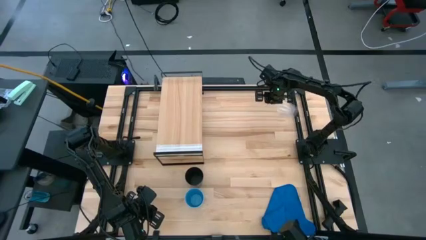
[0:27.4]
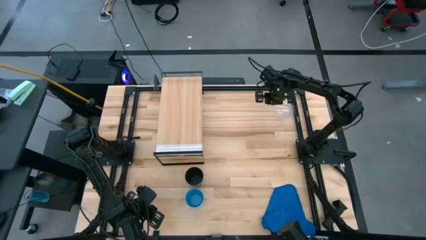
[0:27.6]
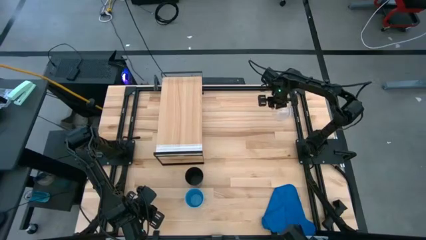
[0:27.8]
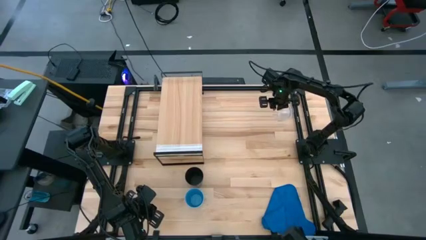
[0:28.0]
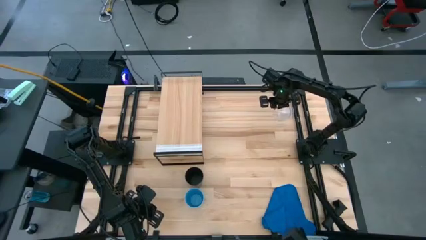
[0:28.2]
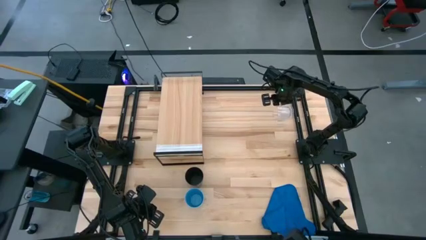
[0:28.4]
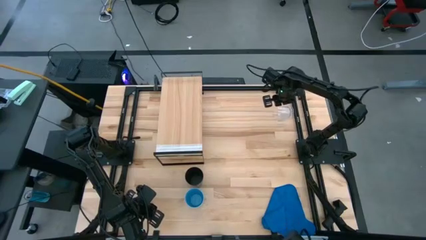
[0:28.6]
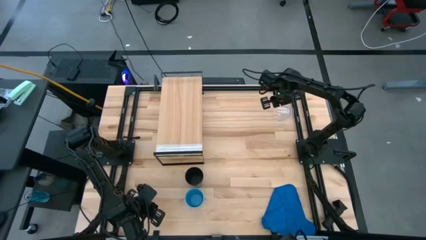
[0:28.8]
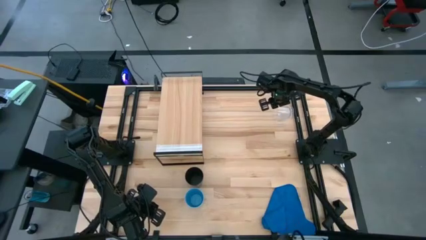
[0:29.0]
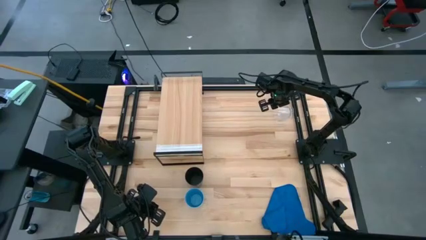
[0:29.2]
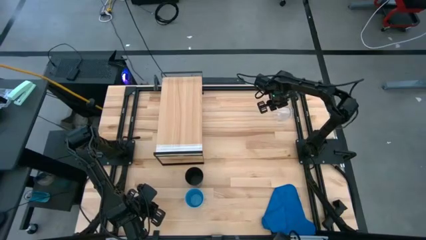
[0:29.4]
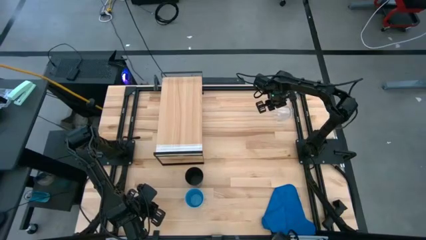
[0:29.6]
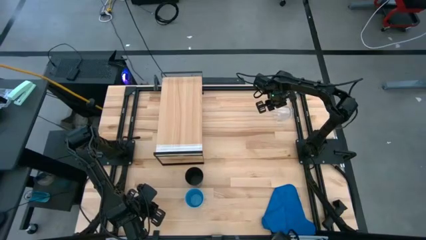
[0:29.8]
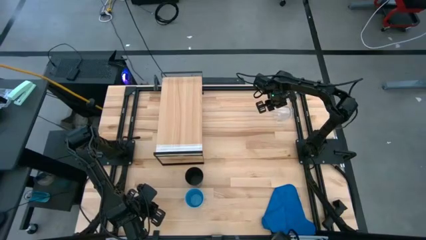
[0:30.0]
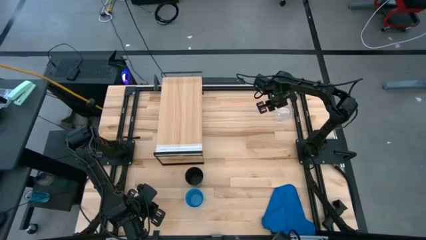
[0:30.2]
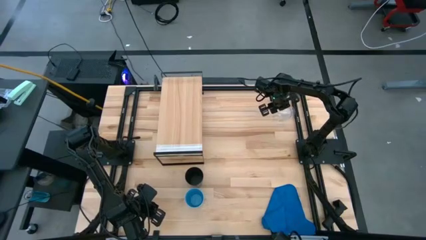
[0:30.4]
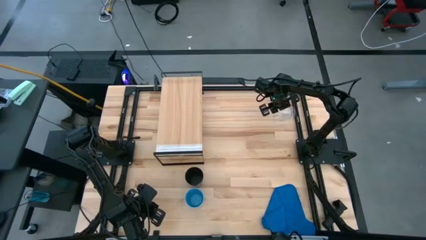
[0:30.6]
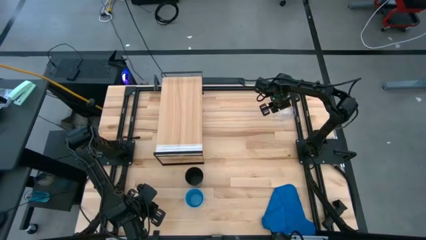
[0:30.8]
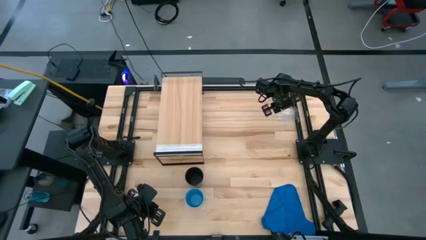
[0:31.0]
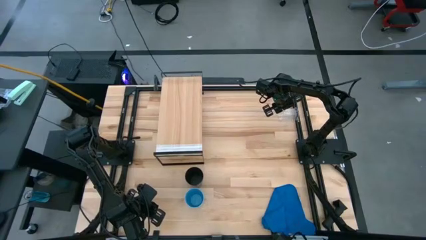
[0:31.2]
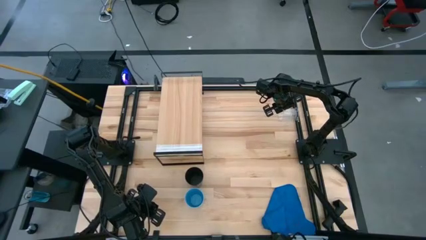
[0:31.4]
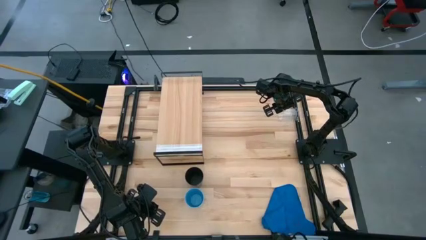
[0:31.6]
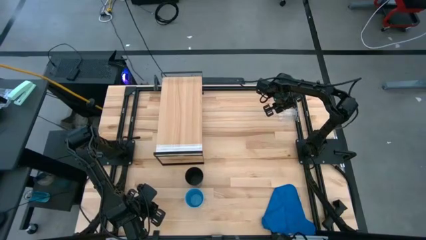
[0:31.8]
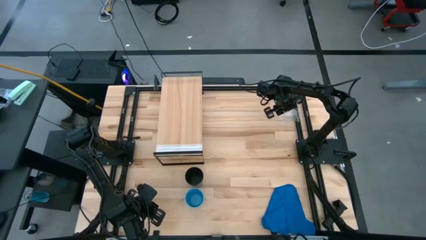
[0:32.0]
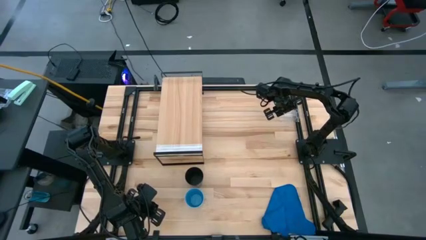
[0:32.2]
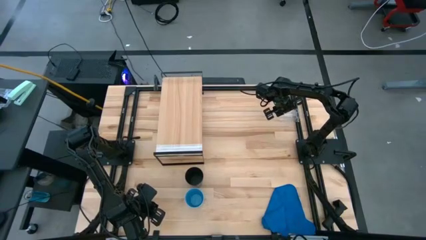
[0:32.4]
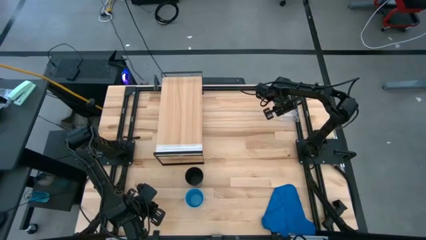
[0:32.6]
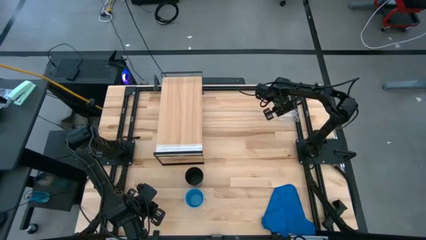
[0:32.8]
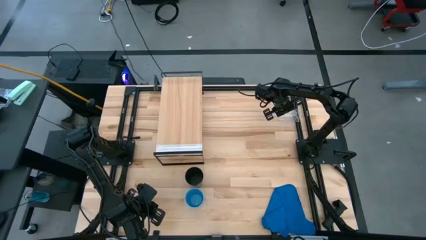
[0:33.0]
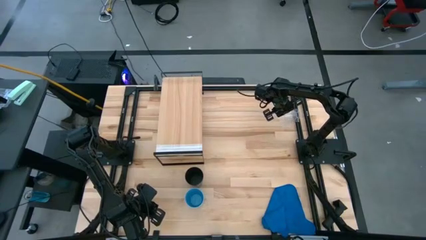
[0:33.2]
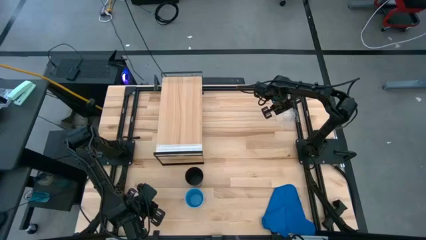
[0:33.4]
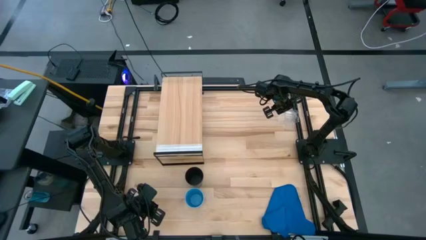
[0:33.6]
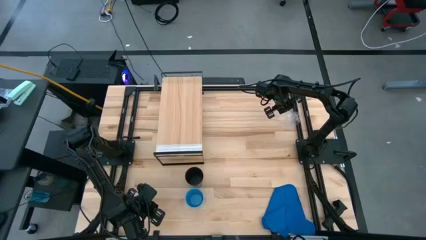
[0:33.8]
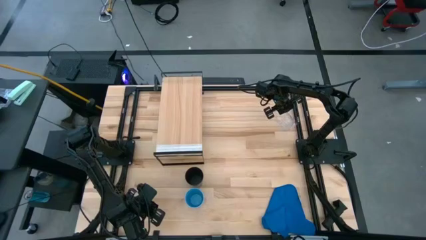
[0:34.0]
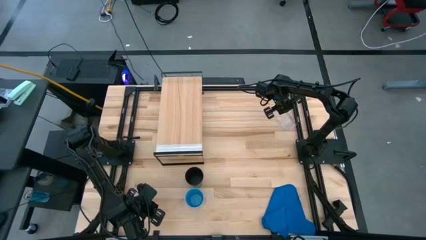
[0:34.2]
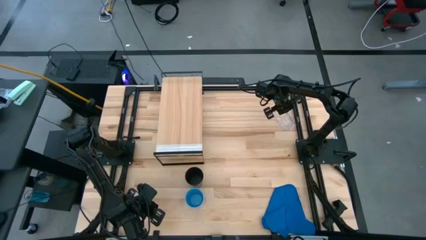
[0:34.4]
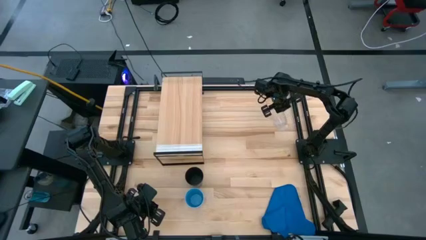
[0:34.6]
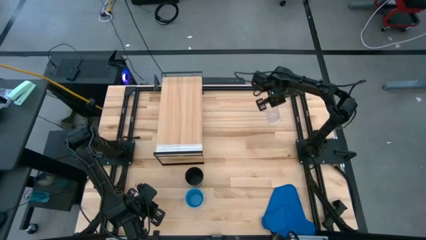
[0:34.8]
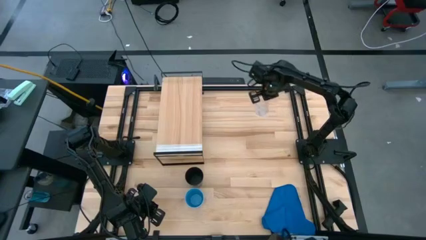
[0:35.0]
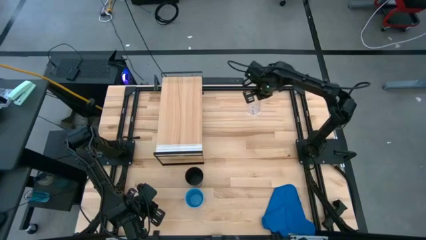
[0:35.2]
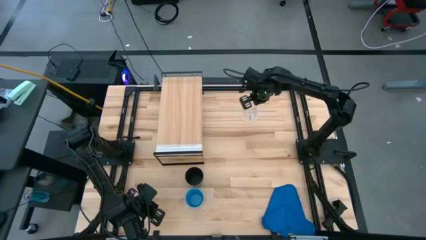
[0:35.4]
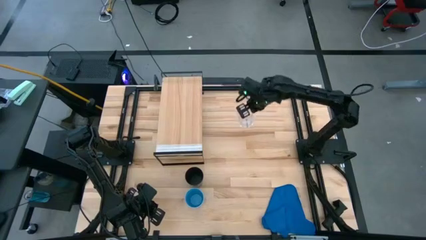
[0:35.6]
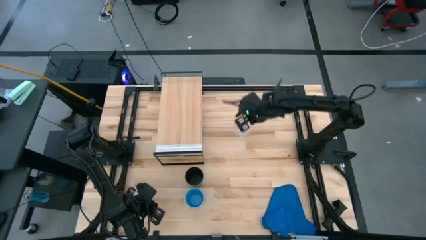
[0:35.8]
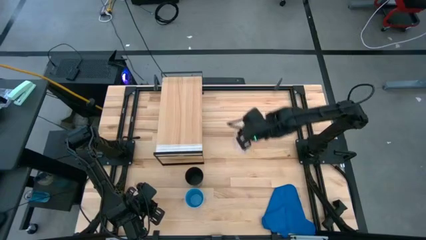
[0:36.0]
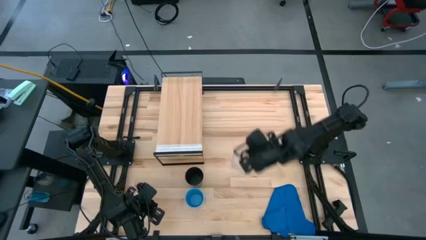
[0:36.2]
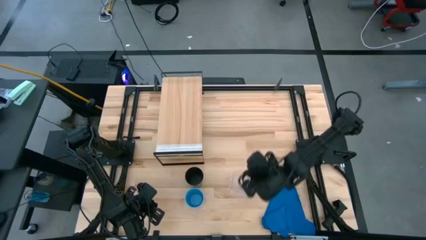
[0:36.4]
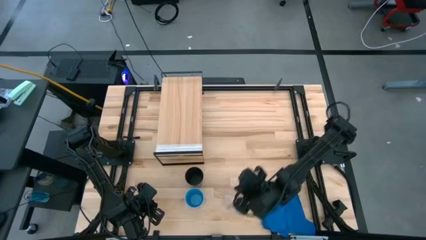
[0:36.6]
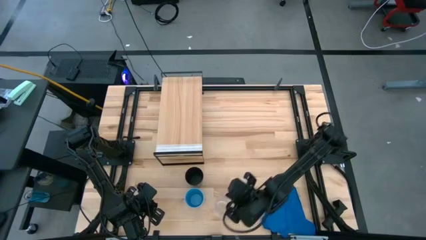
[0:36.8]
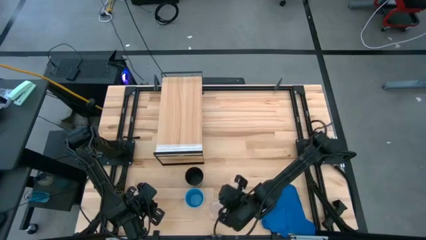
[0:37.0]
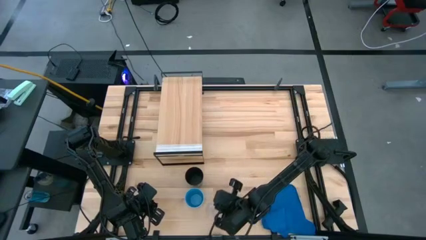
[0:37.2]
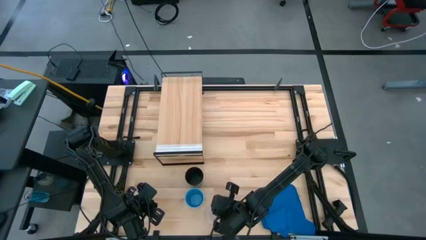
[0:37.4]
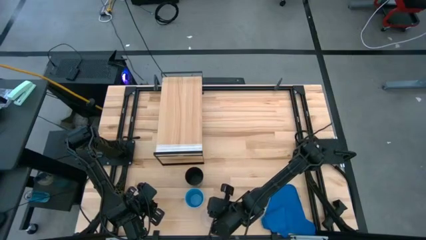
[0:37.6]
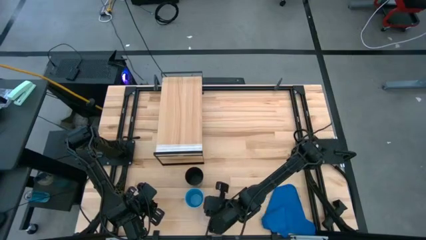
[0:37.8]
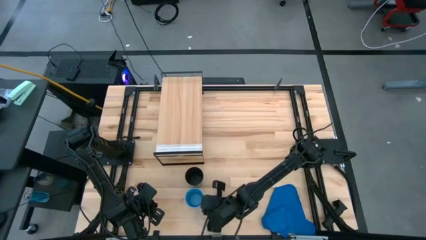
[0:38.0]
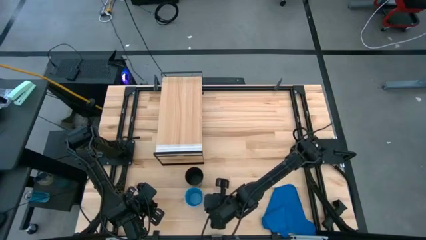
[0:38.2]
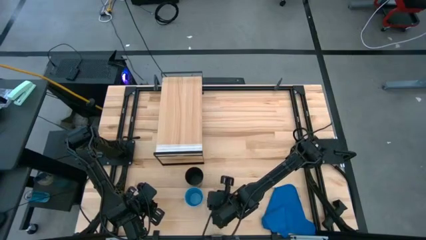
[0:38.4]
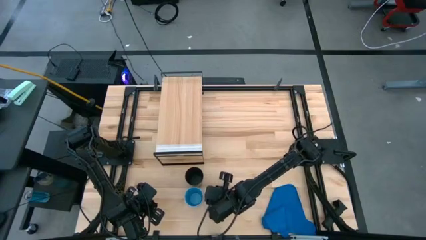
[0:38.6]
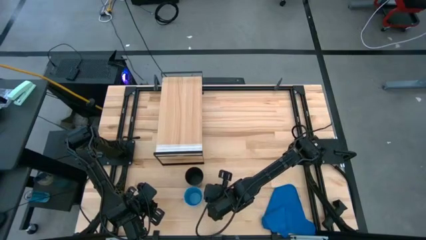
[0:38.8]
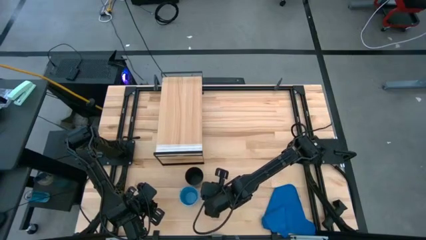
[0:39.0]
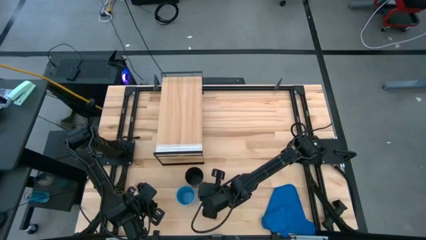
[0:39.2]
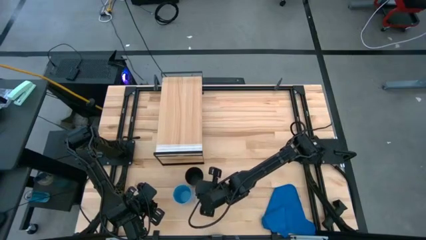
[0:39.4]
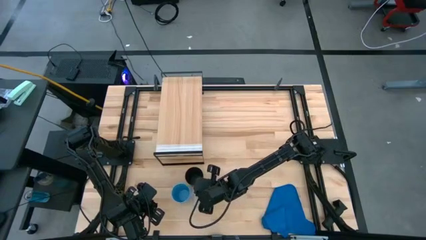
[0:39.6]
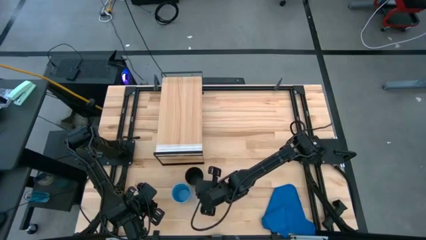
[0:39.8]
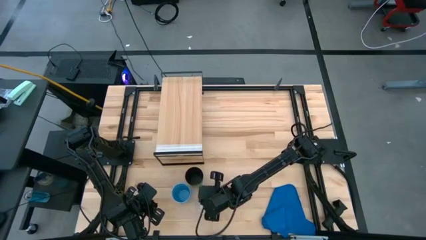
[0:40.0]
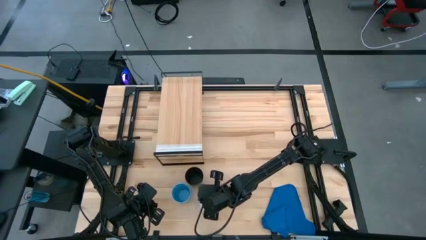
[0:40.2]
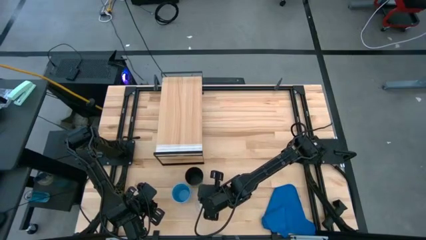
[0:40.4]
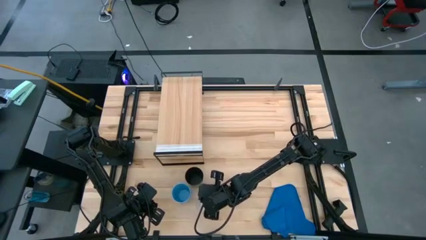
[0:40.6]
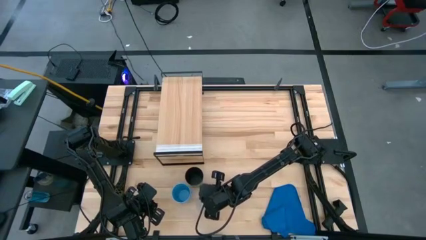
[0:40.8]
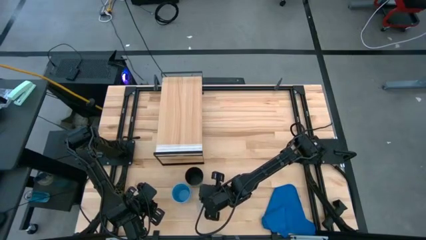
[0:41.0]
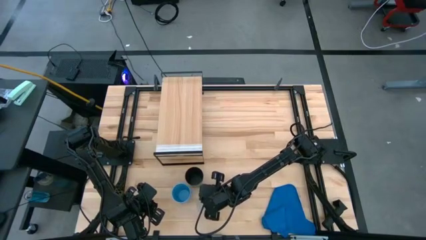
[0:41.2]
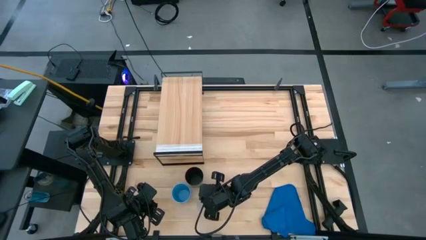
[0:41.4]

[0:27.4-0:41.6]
Task: Stack small to large cups/mugs on shelf
Move the transparent mug to the bottom of the table
